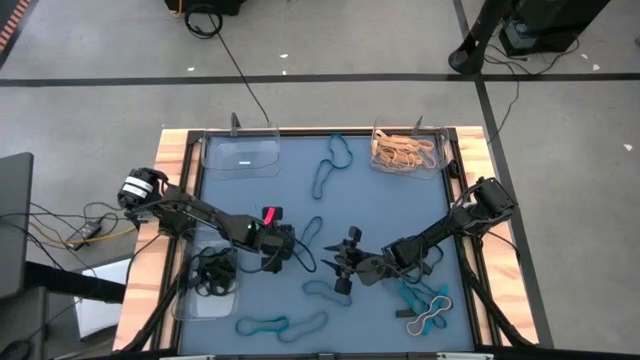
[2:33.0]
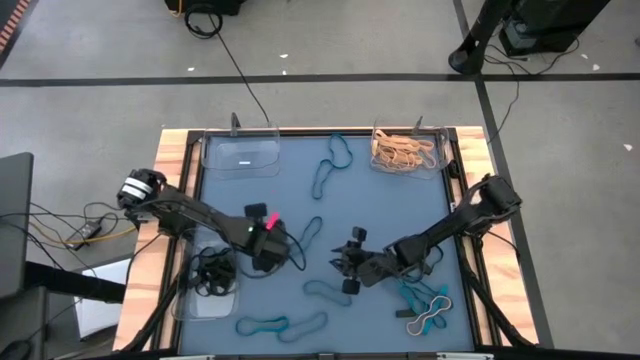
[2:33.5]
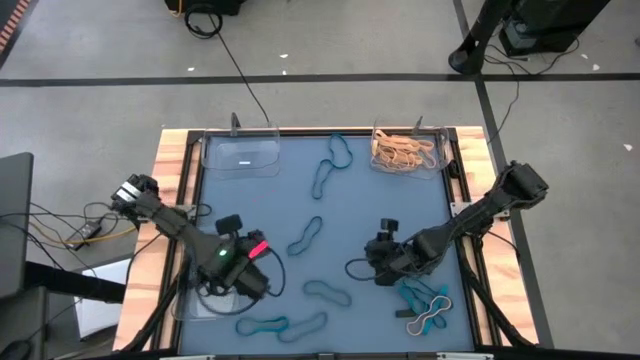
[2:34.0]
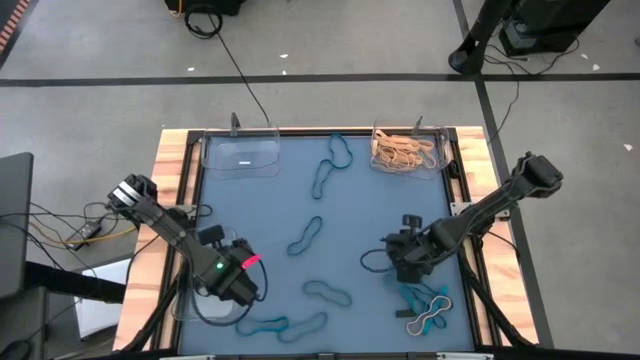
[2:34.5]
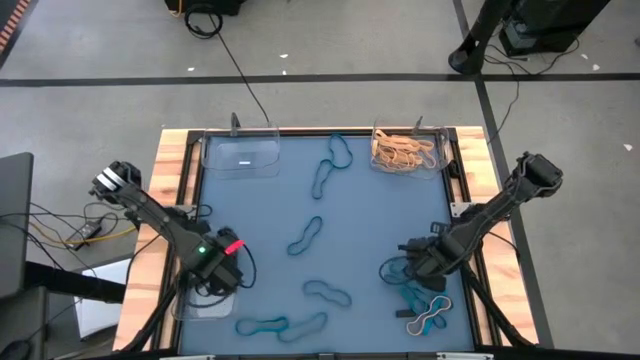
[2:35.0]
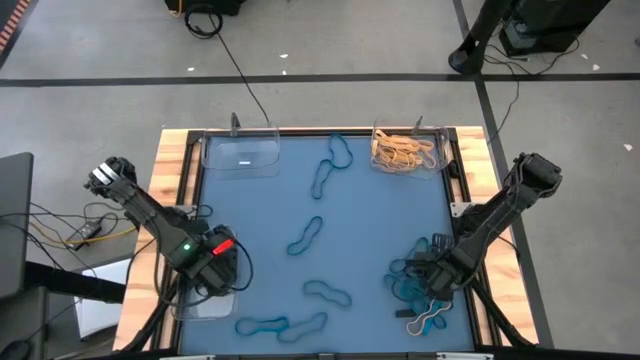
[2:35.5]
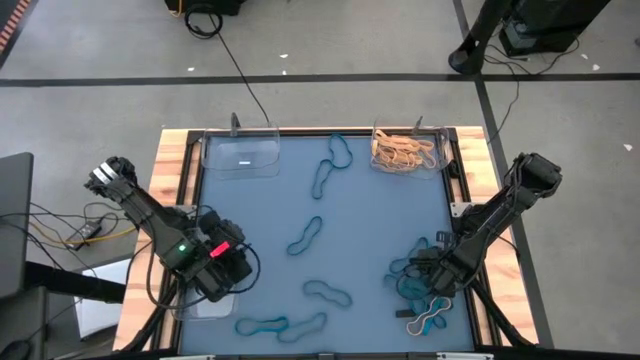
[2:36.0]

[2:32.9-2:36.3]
Task: Sort rubber bands into baskets
Put the small black rubber band into the bottom left transparent bin

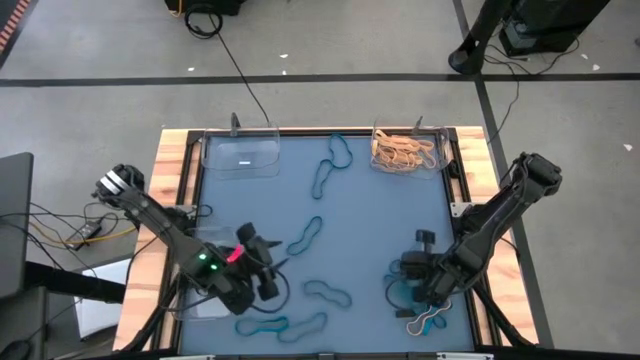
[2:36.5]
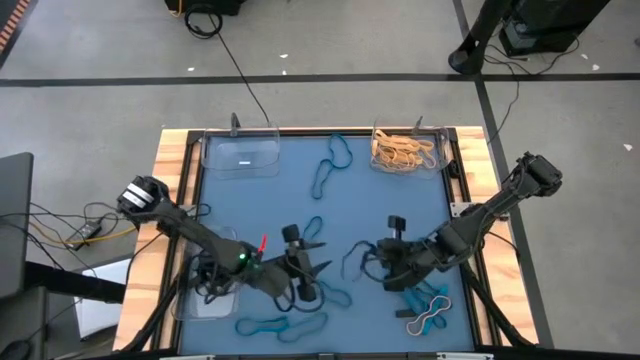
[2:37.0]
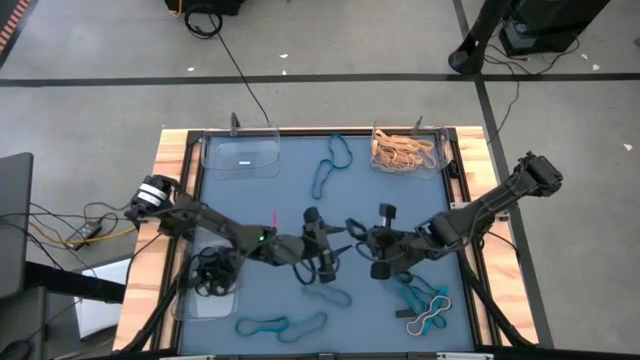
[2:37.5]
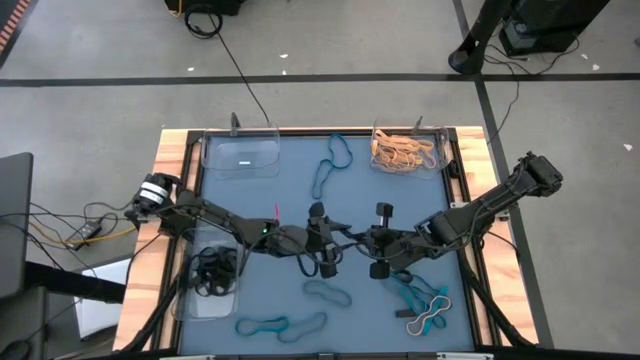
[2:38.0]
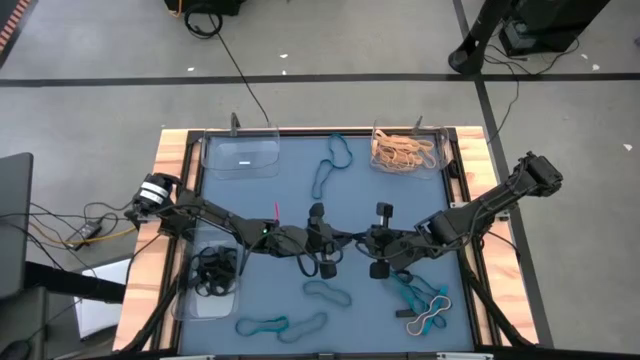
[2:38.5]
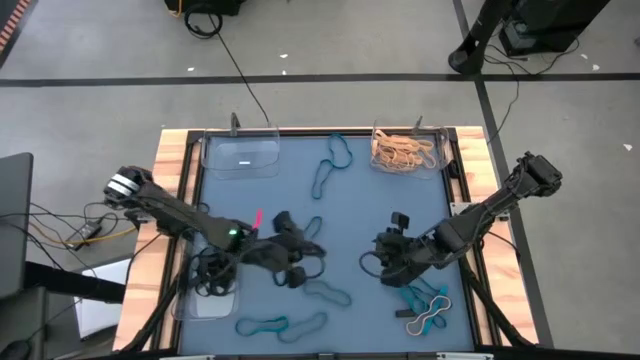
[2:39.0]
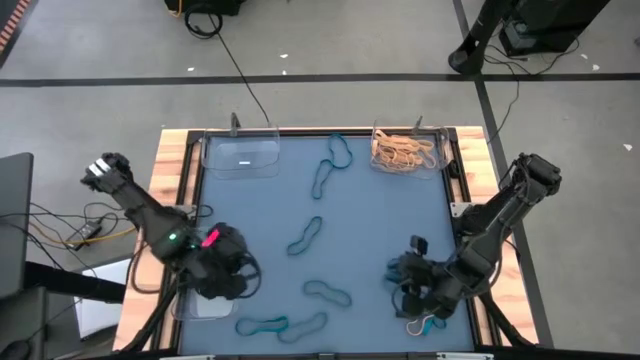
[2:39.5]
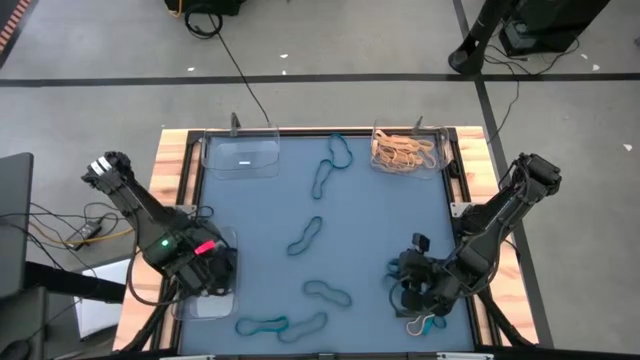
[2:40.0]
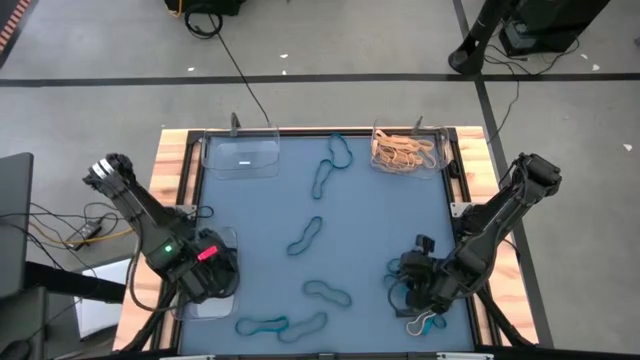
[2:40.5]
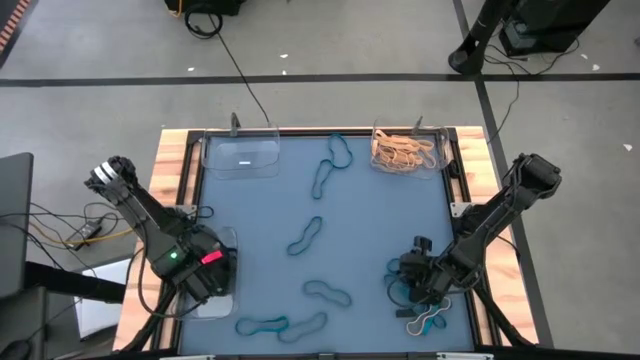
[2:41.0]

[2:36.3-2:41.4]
Put the big black rubber band into the bottom left transparent bin

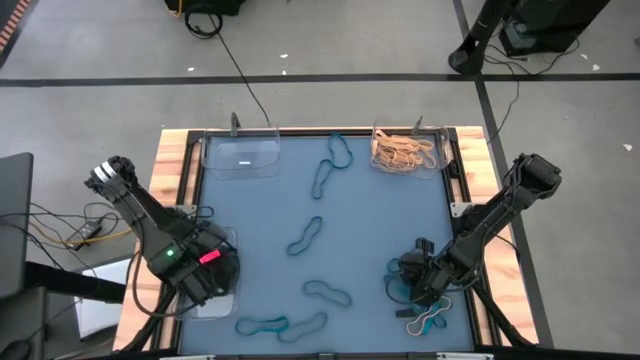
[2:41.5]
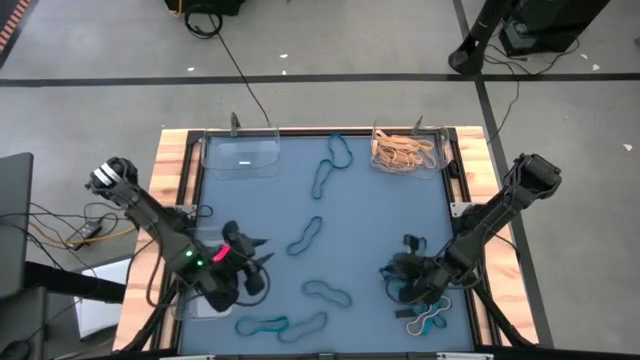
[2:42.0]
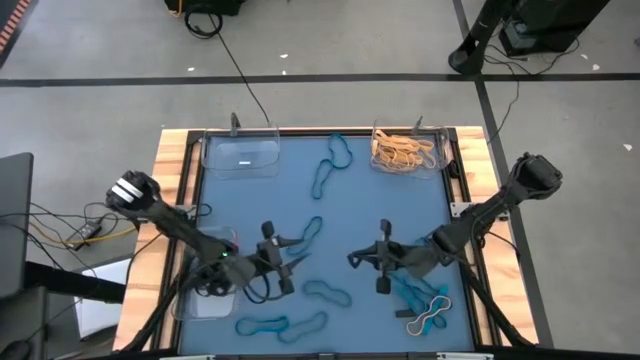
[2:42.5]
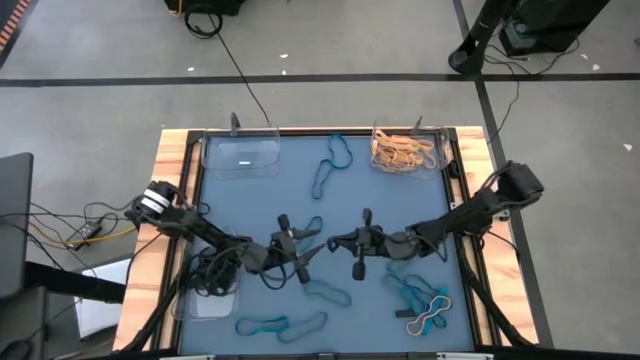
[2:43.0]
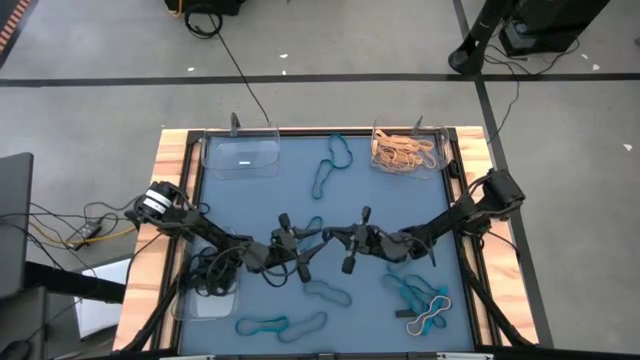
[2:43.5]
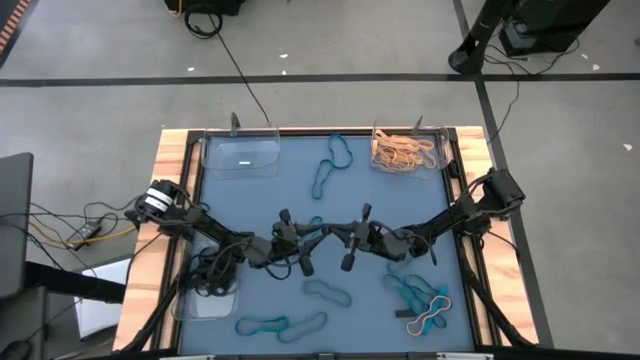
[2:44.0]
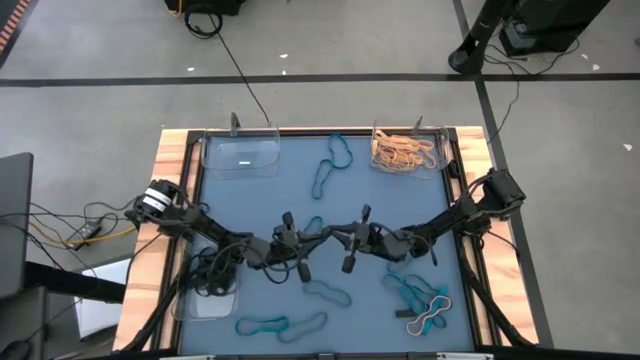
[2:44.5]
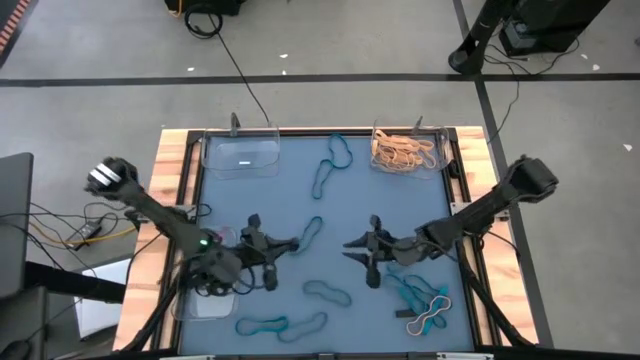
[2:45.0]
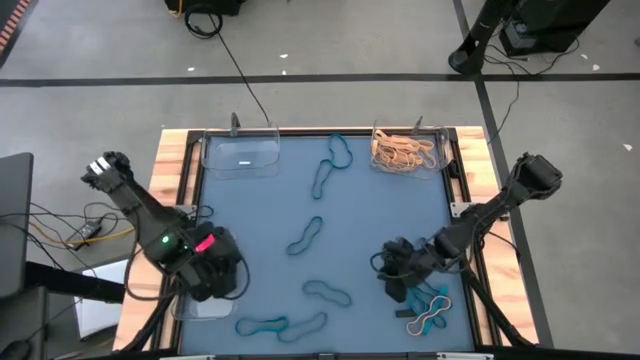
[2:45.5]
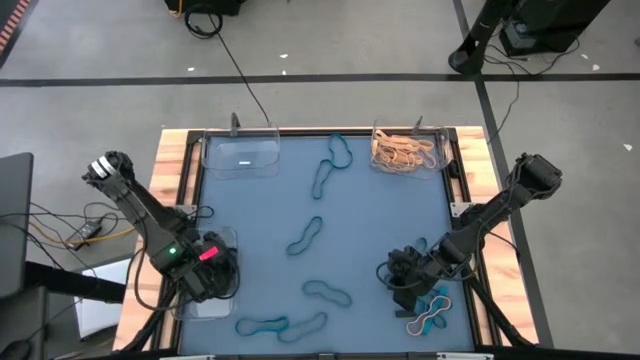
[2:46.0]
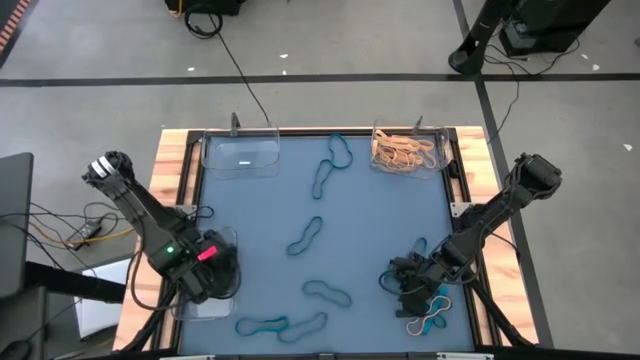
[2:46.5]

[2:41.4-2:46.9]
Put the small black rubber band into the bottom left transparent bin

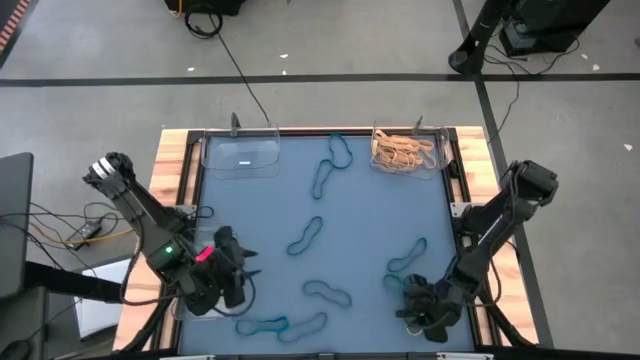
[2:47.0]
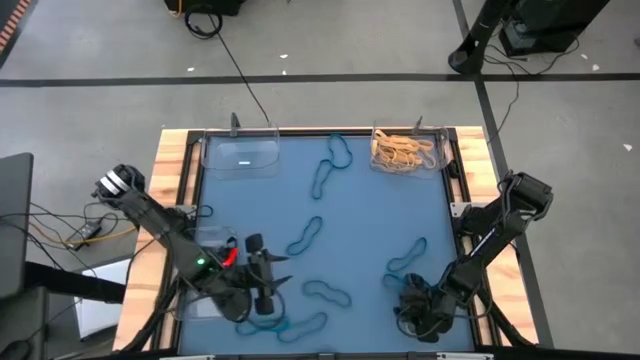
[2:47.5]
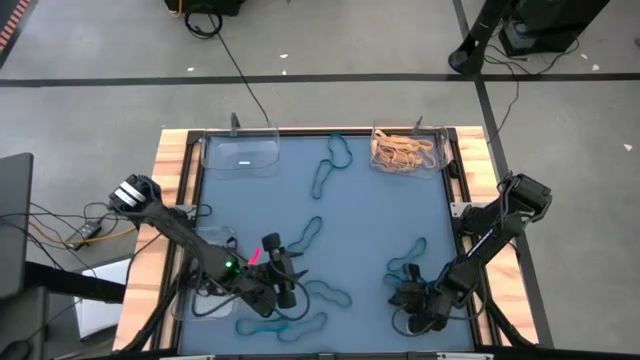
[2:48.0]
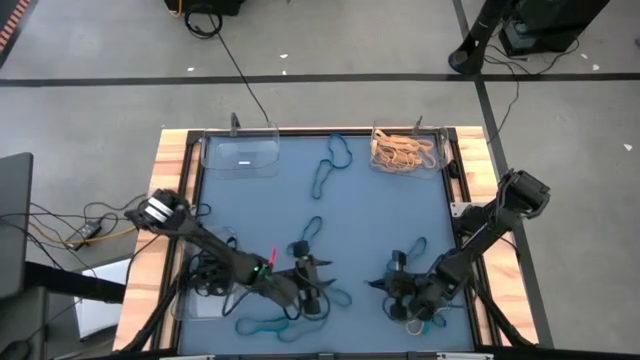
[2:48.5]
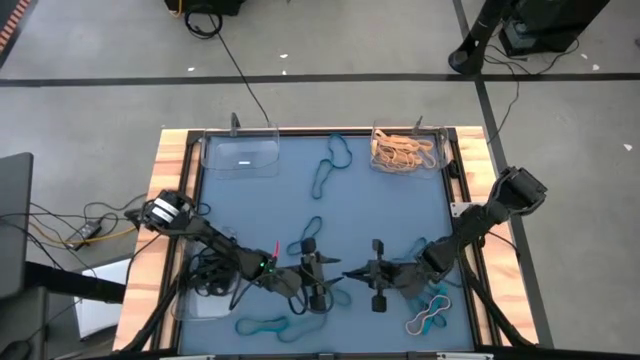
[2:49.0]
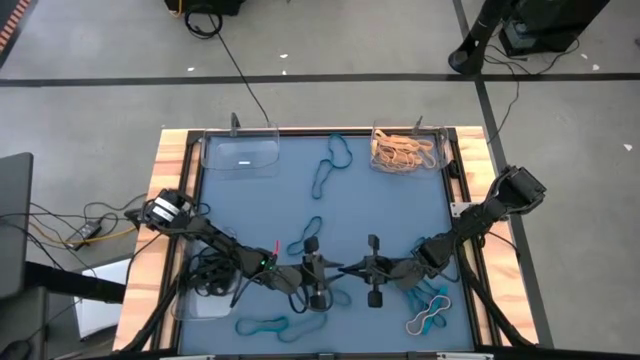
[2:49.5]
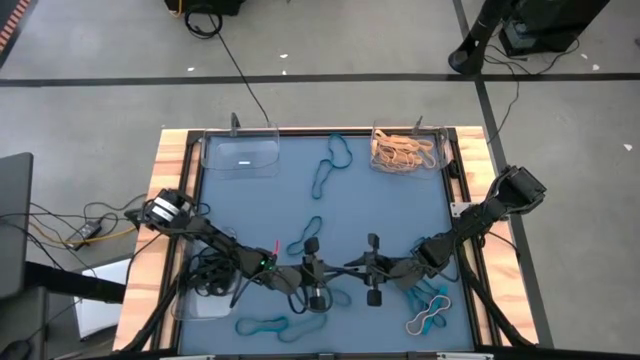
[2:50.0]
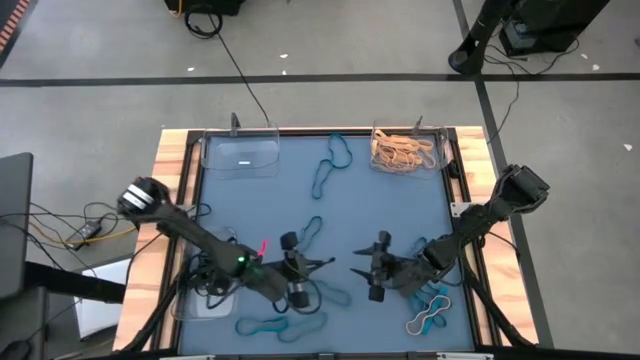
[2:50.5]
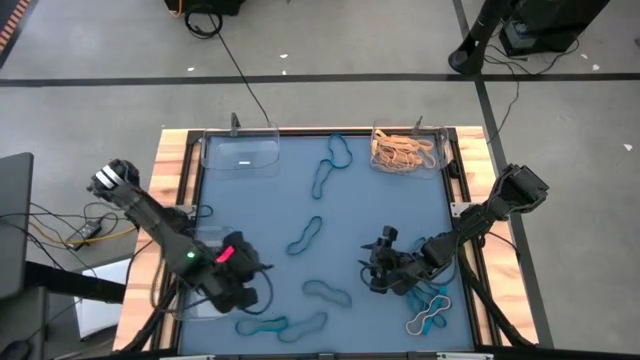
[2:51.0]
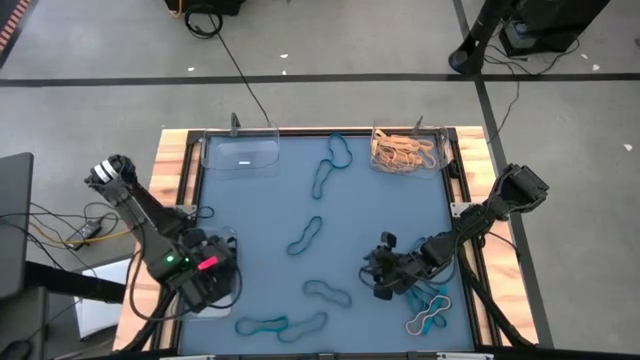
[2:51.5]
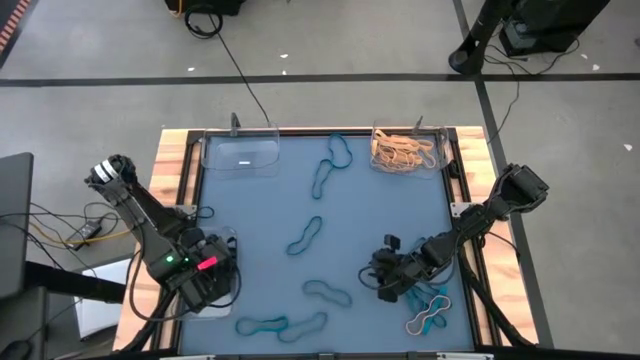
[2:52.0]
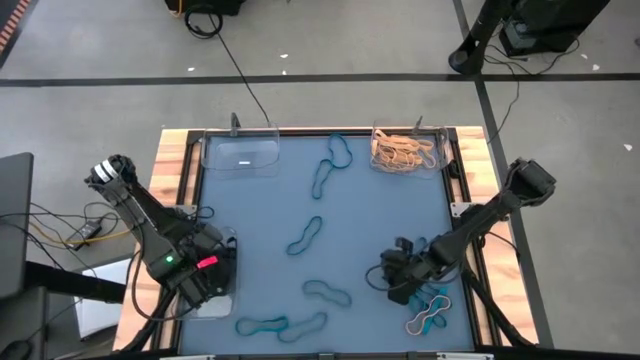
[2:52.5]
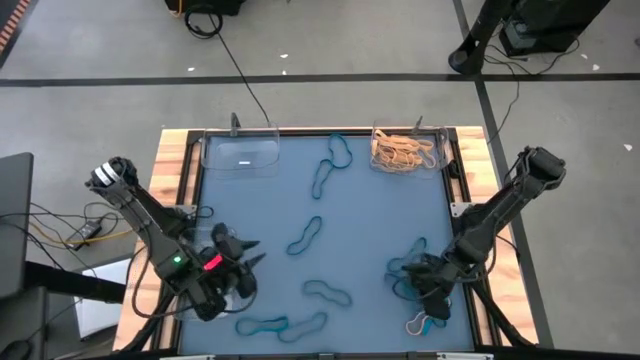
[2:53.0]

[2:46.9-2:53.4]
Put the small black rubber band into the bottom left transparent plastic container
